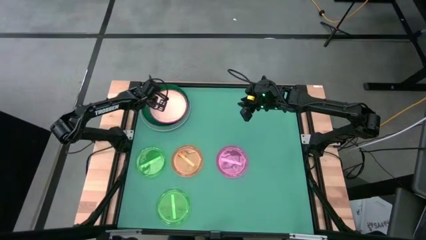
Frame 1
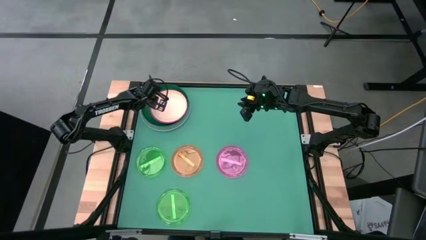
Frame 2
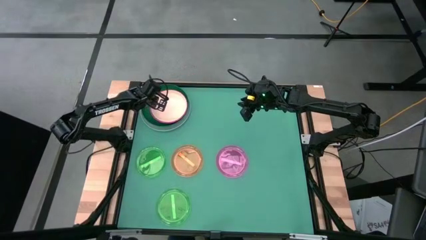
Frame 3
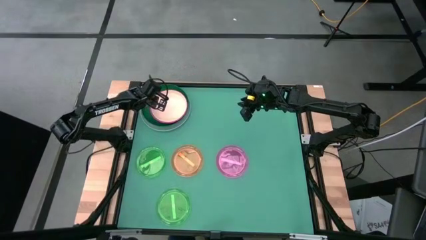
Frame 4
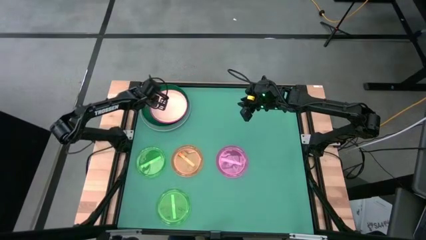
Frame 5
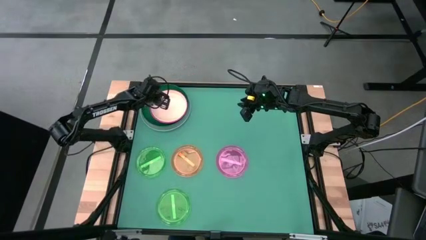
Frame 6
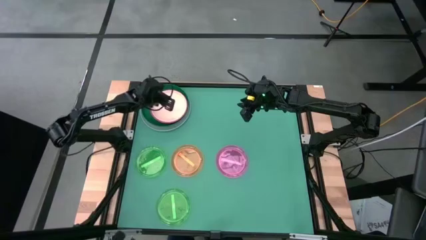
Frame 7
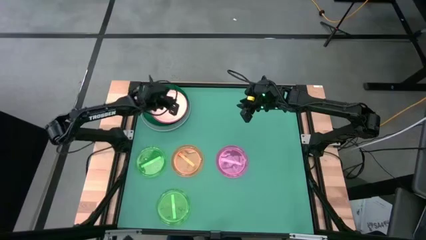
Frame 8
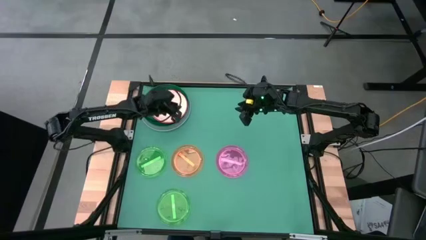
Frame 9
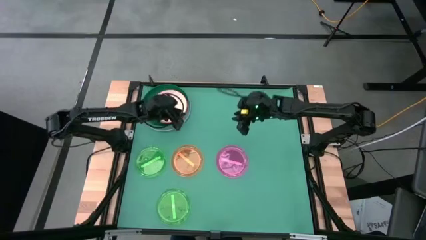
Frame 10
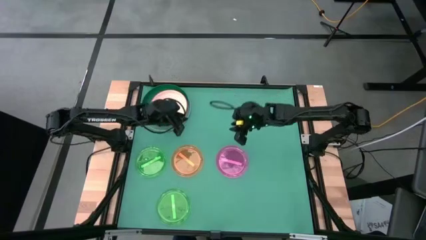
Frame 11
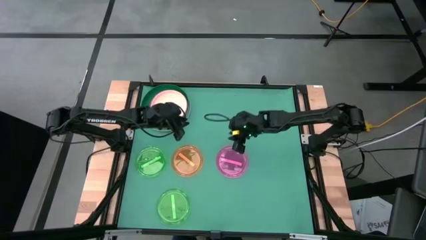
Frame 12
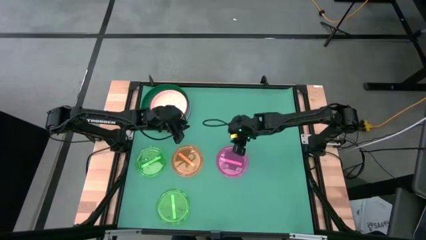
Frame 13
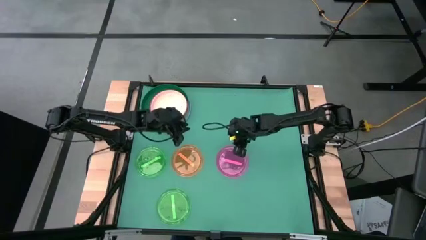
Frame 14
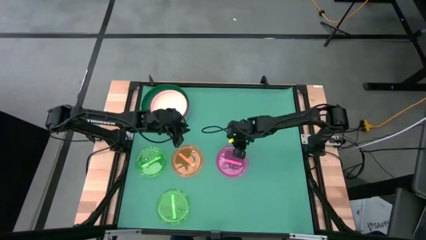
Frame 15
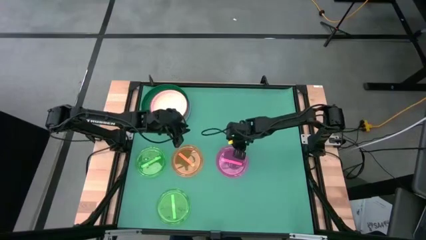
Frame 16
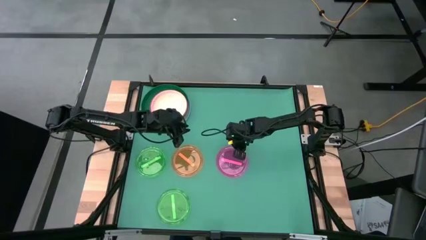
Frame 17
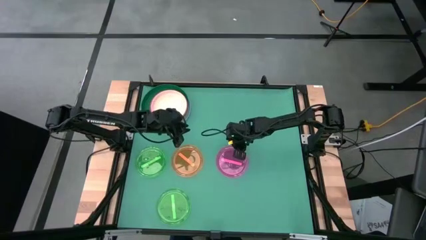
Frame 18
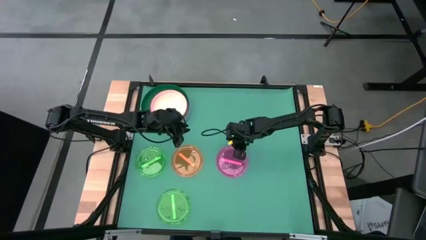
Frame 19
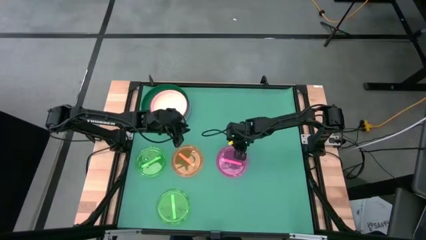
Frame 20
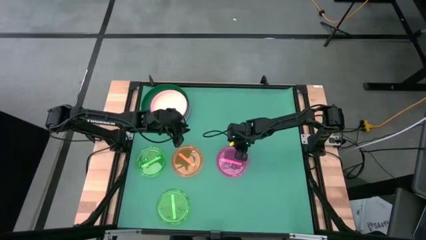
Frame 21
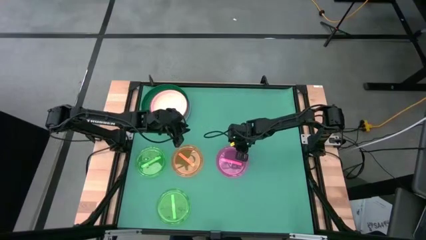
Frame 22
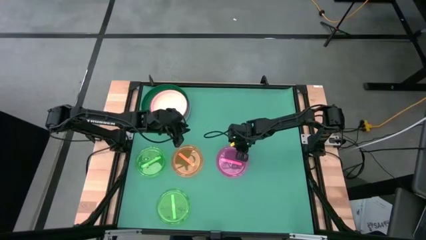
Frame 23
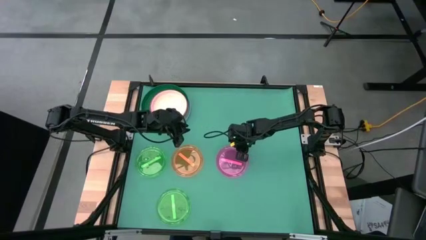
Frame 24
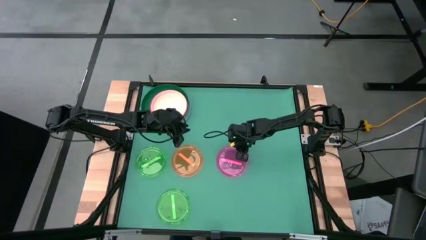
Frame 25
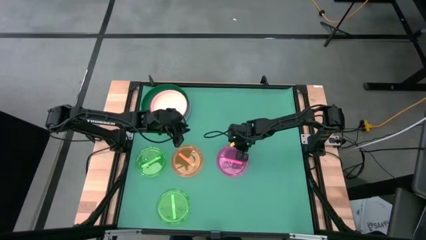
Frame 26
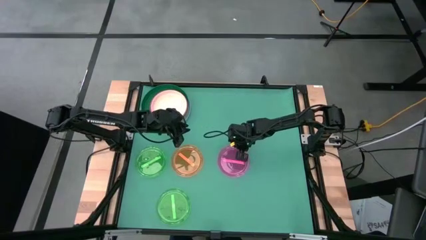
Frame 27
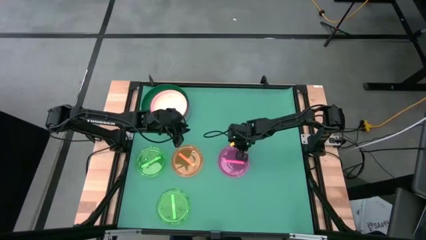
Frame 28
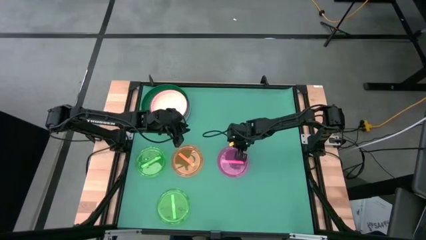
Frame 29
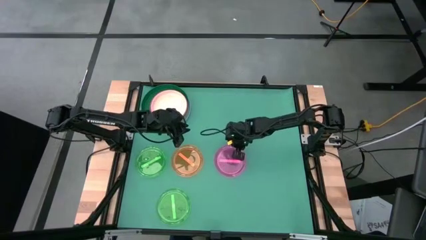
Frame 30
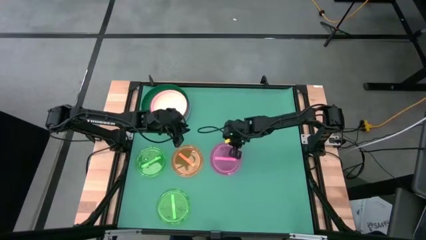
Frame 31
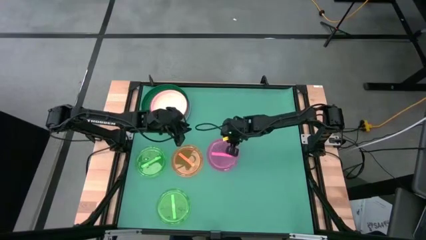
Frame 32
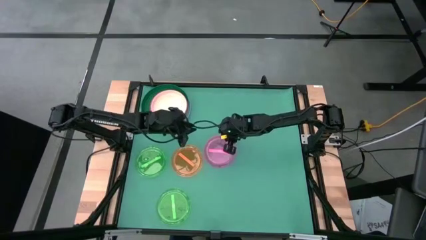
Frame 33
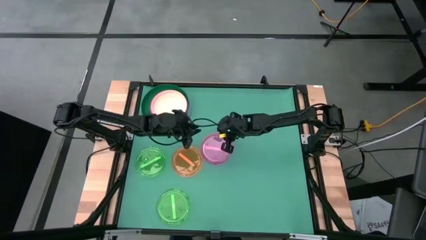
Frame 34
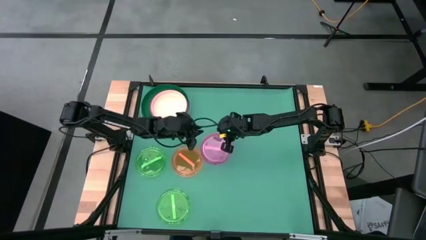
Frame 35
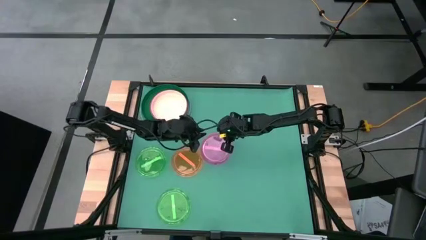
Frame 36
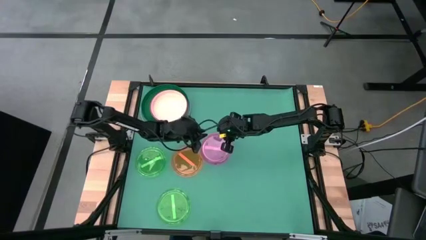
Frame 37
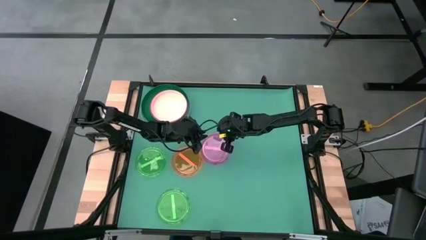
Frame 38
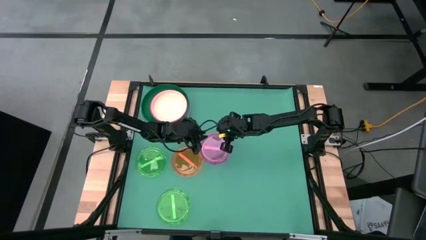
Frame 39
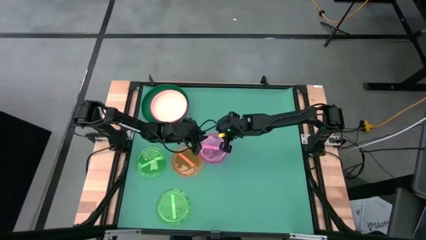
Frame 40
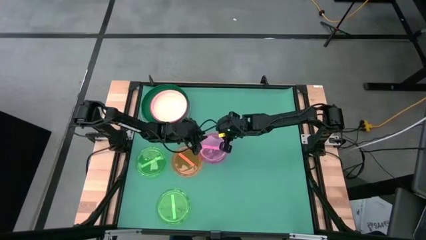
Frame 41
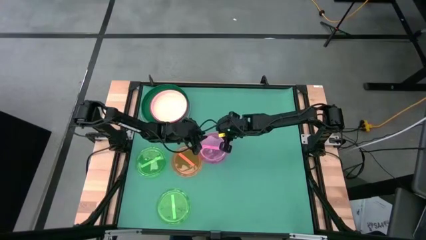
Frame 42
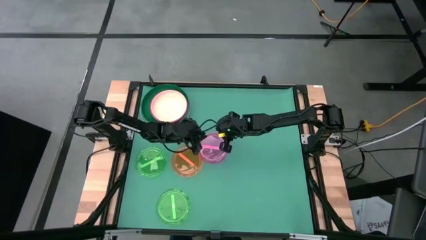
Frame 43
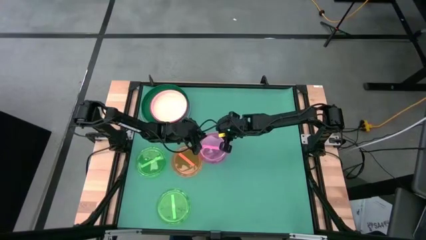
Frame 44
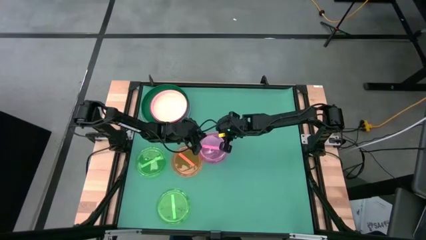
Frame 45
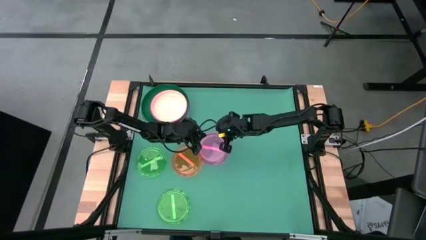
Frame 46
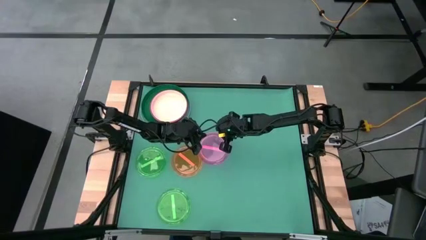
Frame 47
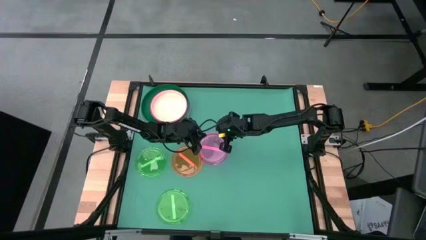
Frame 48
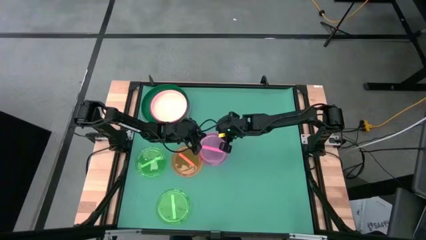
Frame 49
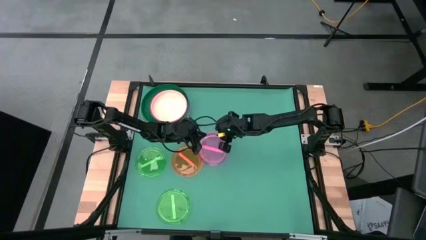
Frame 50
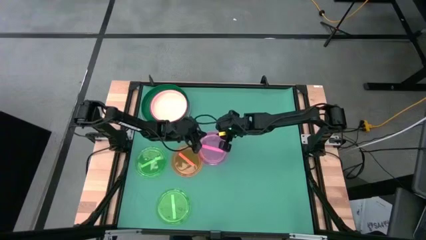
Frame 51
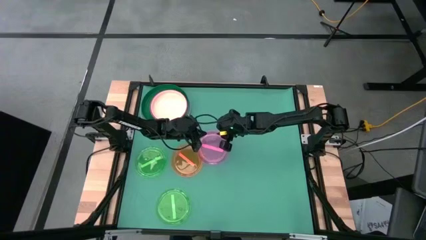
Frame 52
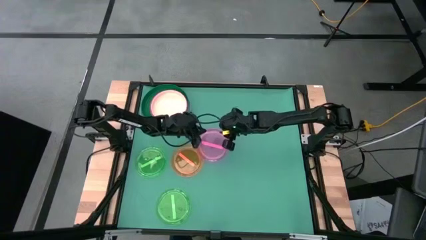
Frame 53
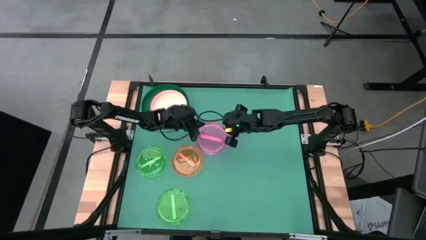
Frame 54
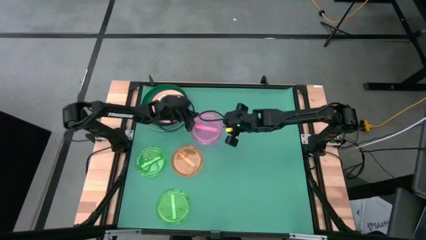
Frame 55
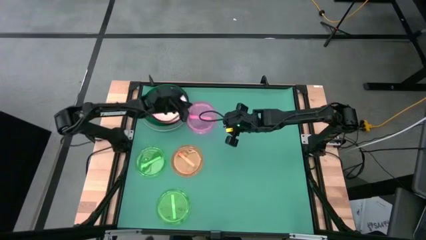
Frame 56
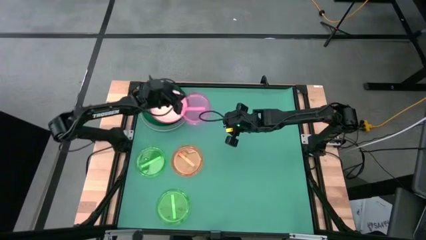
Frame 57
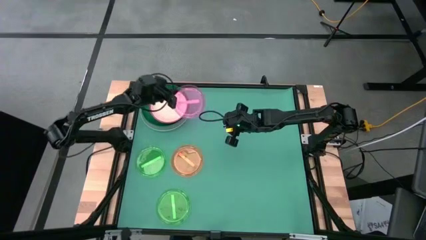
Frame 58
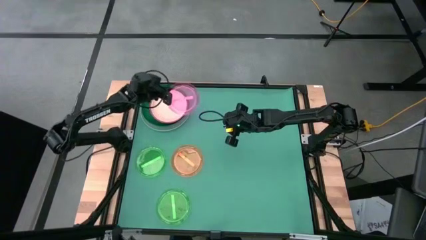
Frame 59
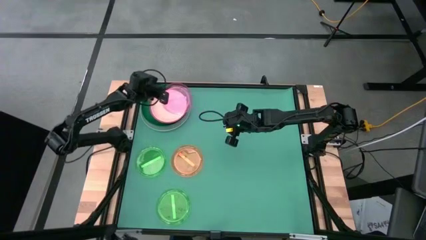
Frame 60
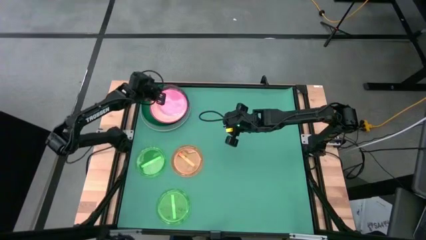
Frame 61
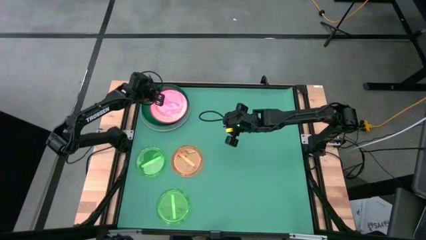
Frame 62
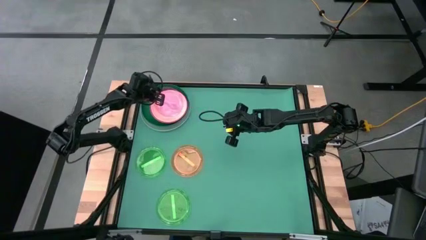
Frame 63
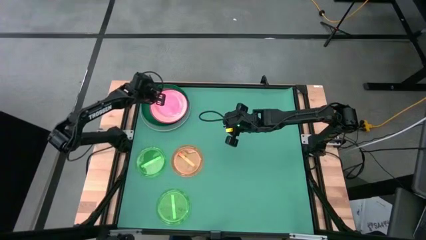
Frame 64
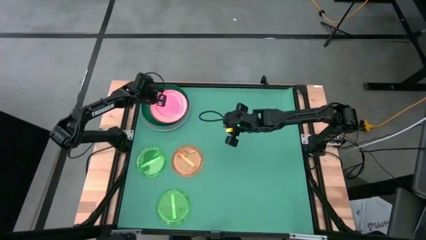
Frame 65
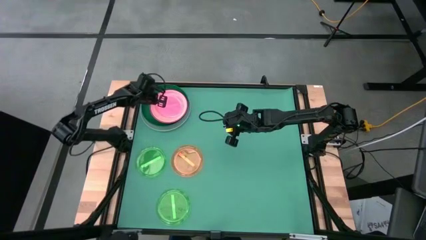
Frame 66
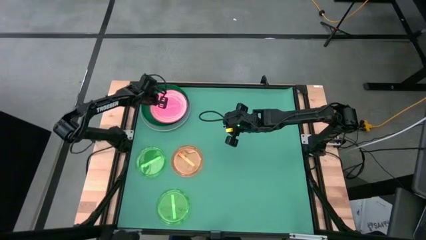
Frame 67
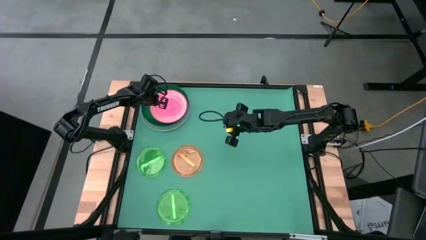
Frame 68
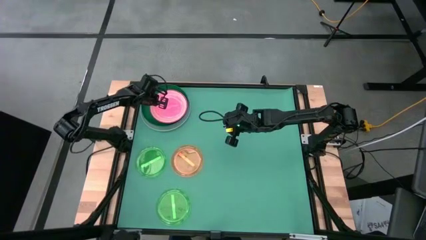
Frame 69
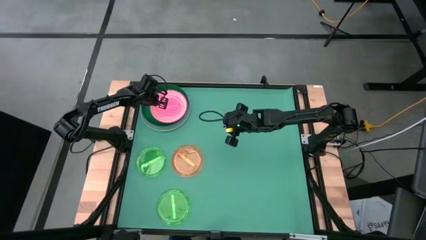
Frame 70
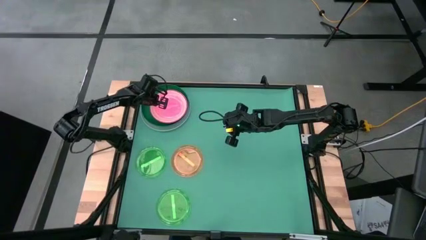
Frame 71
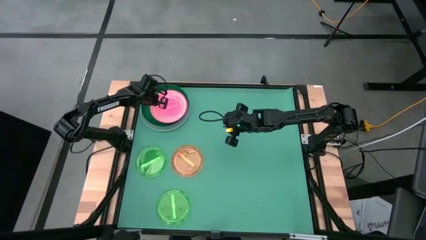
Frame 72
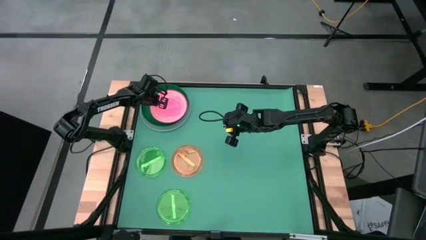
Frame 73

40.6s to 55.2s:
Task: Stack plastic plates
Stack the pink plate on top of the light orange plate
